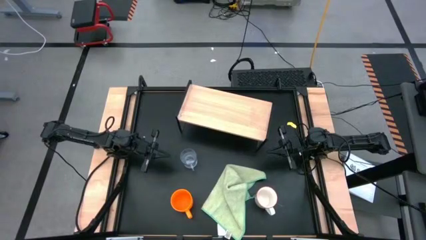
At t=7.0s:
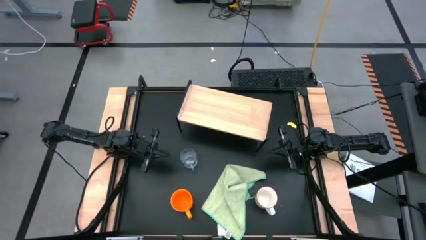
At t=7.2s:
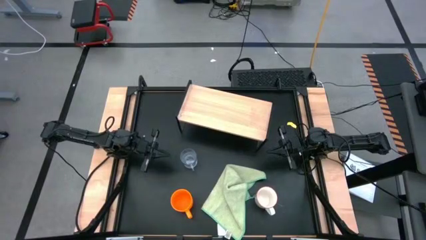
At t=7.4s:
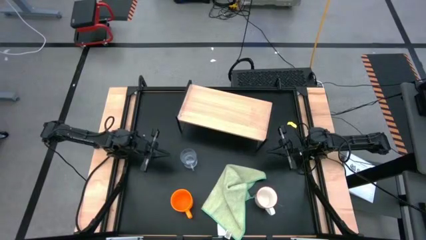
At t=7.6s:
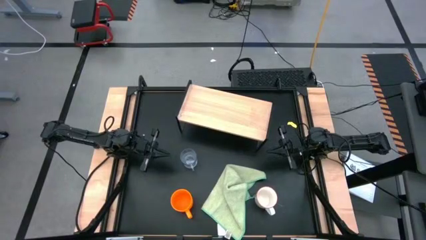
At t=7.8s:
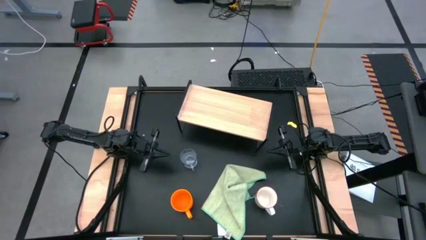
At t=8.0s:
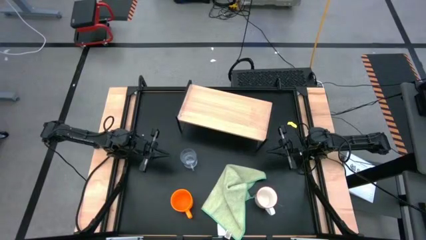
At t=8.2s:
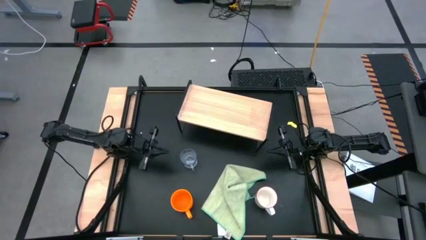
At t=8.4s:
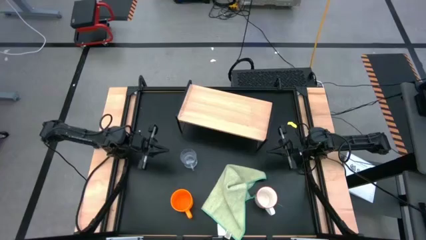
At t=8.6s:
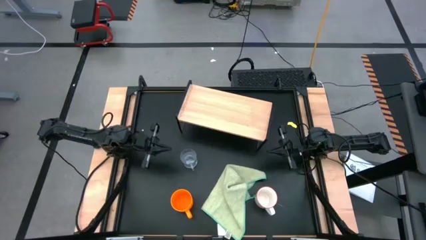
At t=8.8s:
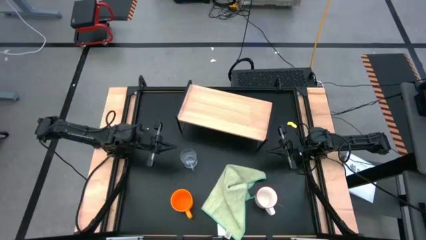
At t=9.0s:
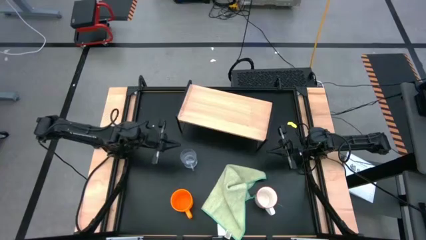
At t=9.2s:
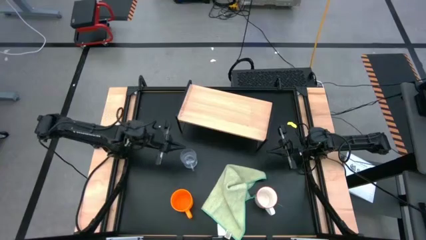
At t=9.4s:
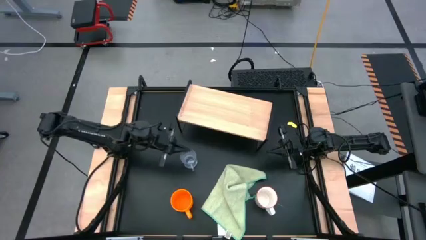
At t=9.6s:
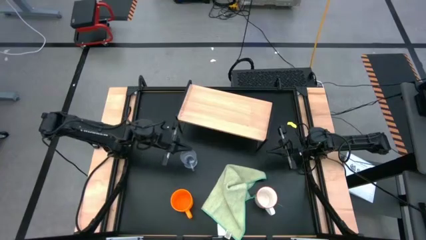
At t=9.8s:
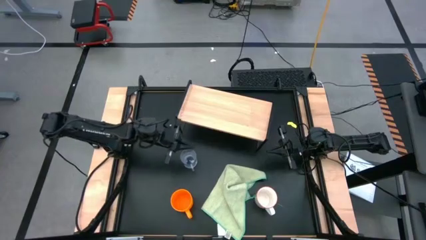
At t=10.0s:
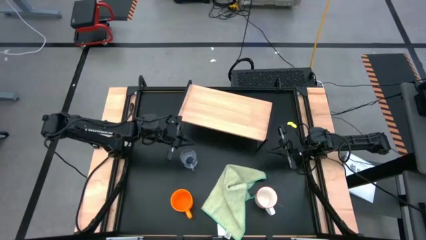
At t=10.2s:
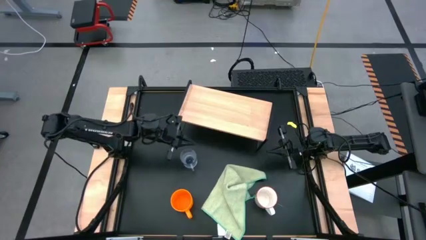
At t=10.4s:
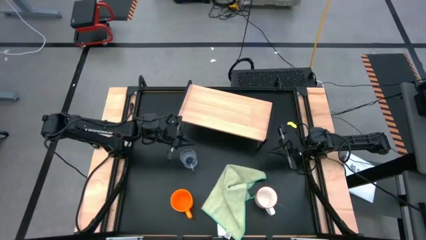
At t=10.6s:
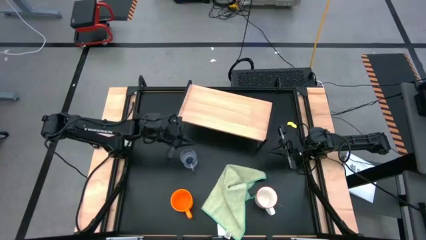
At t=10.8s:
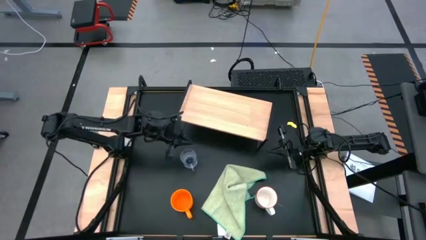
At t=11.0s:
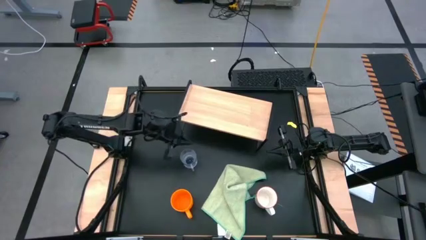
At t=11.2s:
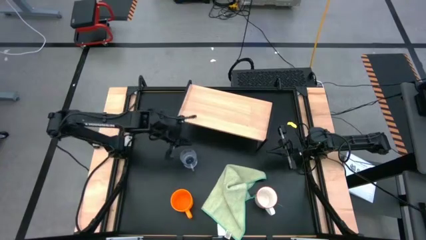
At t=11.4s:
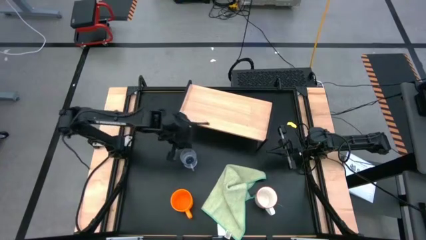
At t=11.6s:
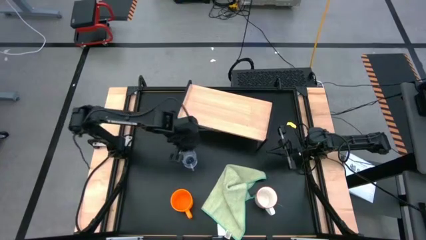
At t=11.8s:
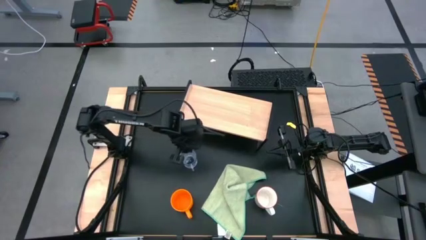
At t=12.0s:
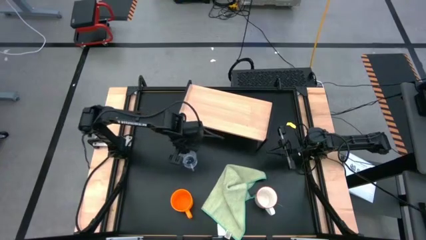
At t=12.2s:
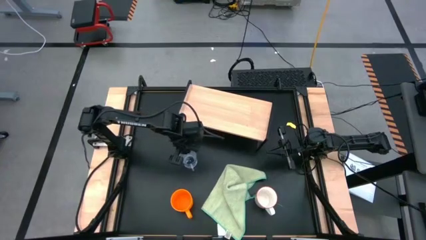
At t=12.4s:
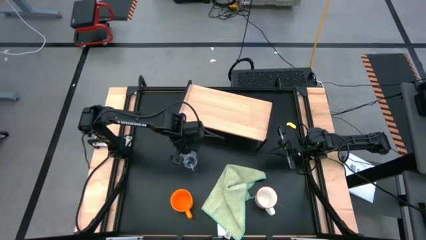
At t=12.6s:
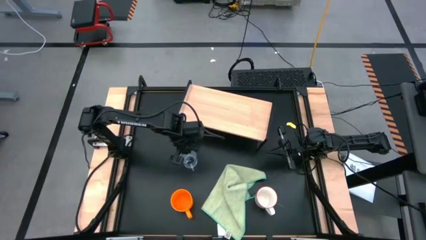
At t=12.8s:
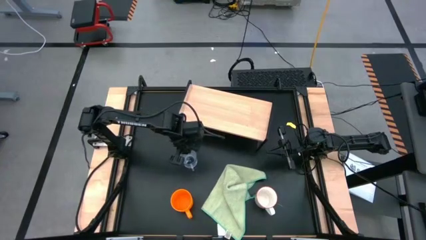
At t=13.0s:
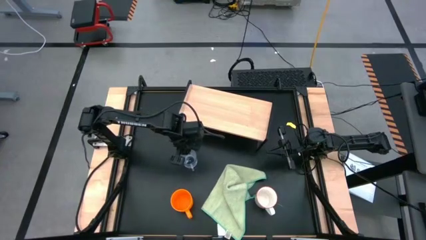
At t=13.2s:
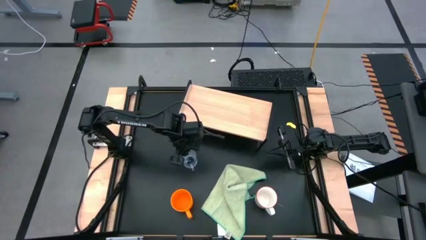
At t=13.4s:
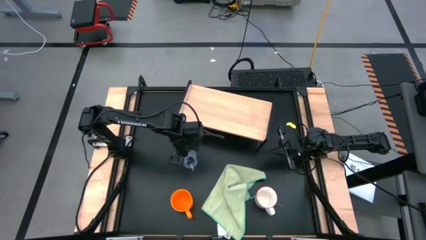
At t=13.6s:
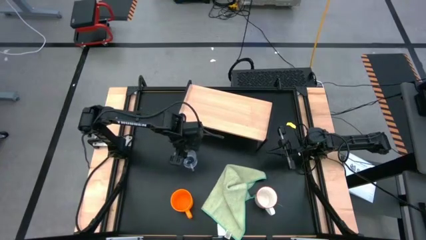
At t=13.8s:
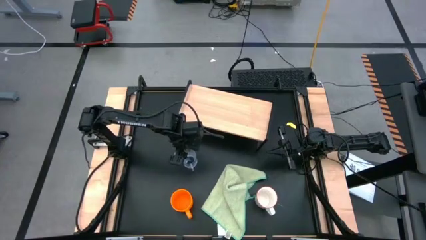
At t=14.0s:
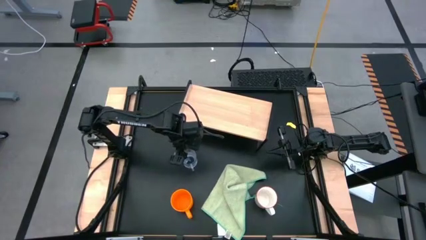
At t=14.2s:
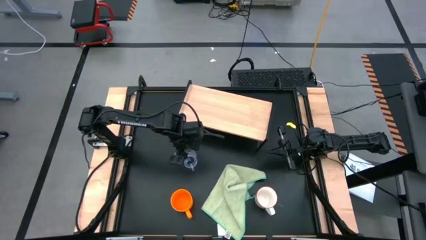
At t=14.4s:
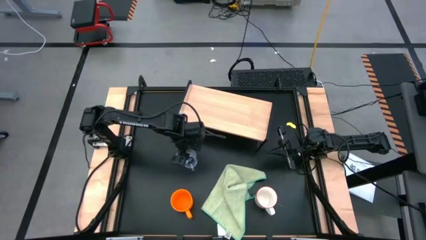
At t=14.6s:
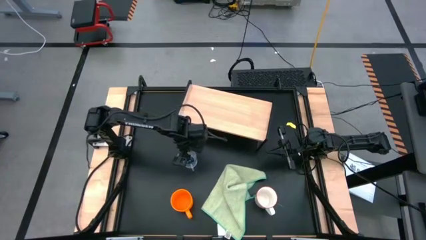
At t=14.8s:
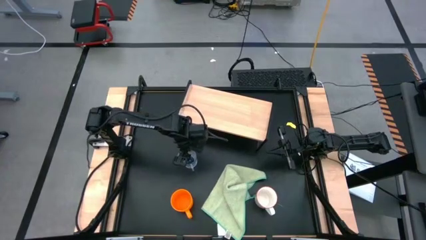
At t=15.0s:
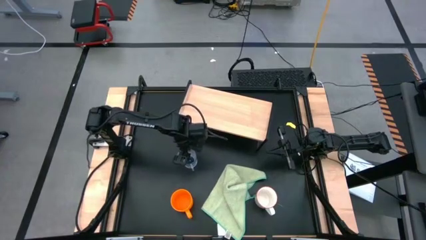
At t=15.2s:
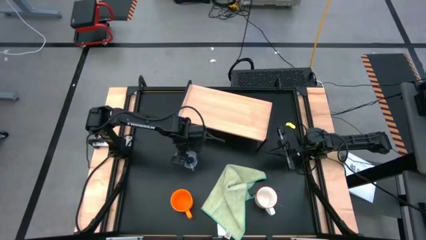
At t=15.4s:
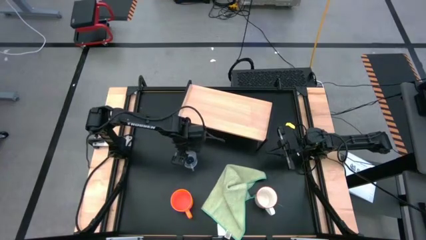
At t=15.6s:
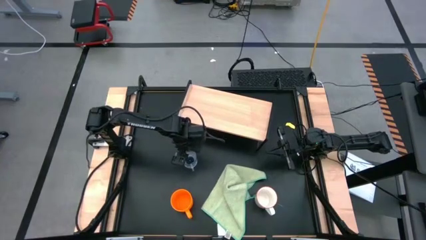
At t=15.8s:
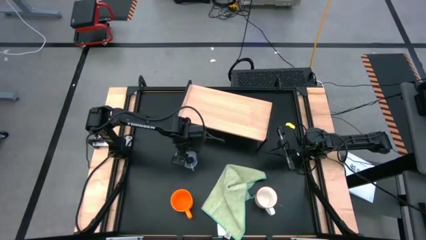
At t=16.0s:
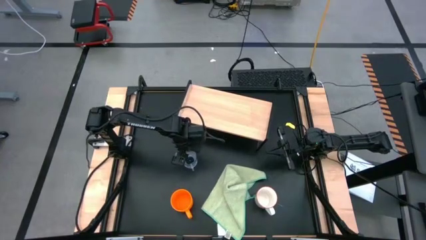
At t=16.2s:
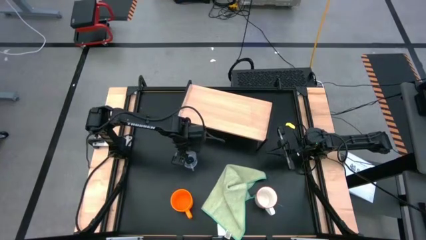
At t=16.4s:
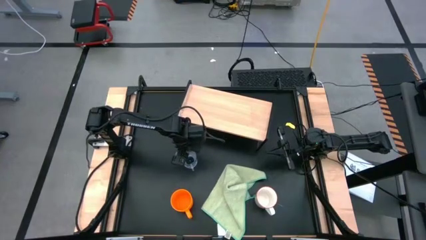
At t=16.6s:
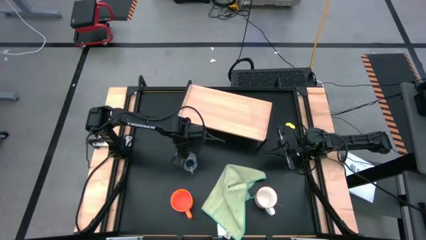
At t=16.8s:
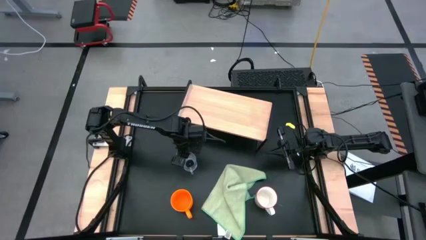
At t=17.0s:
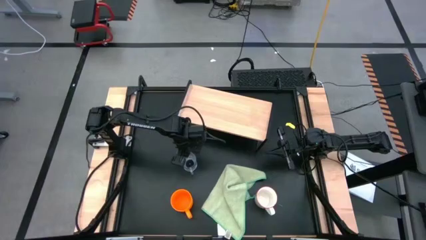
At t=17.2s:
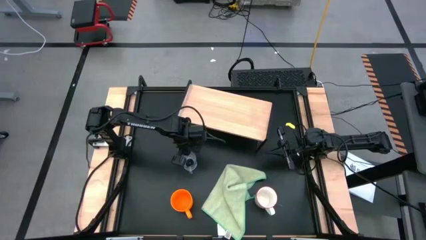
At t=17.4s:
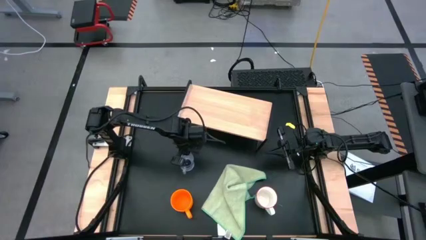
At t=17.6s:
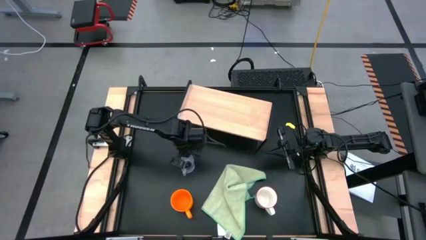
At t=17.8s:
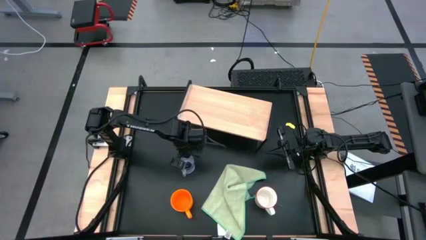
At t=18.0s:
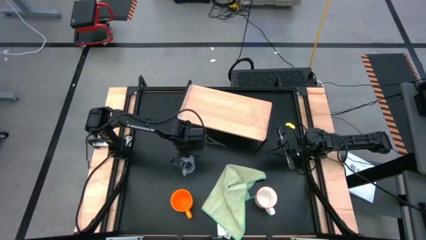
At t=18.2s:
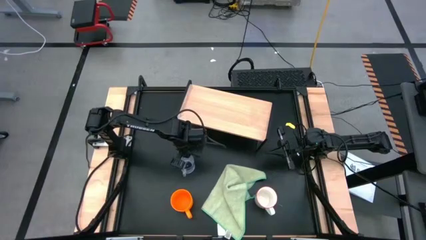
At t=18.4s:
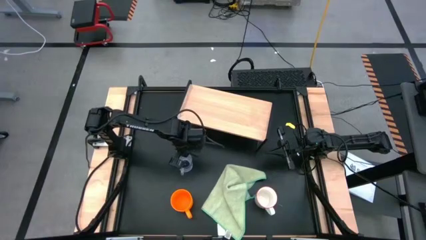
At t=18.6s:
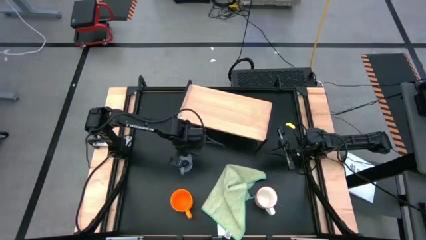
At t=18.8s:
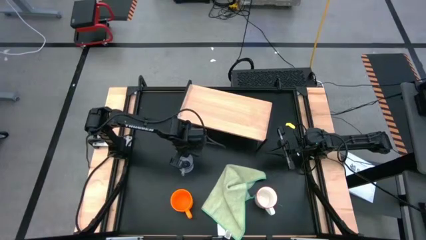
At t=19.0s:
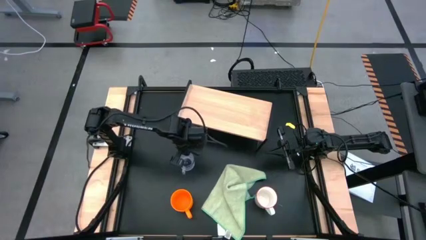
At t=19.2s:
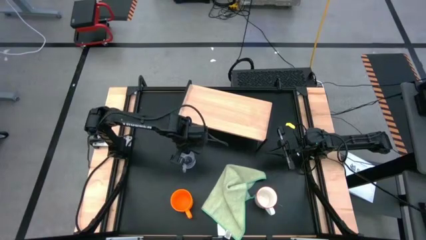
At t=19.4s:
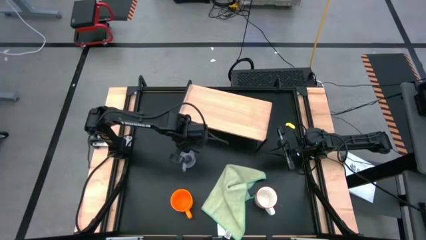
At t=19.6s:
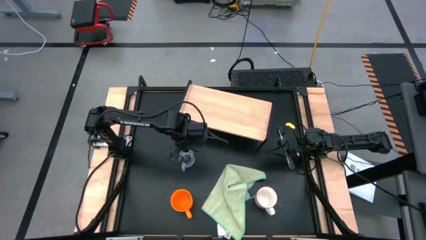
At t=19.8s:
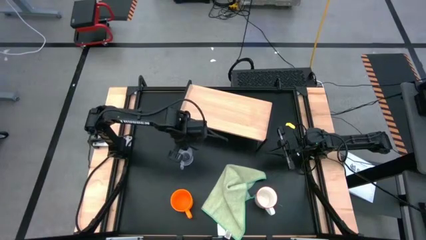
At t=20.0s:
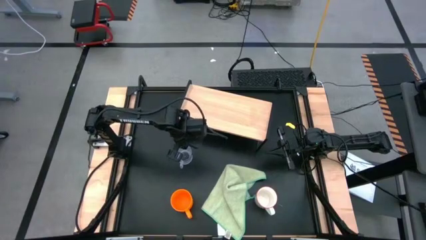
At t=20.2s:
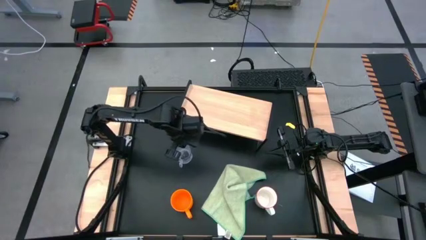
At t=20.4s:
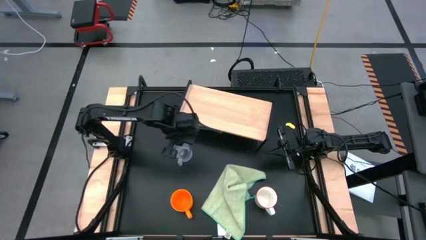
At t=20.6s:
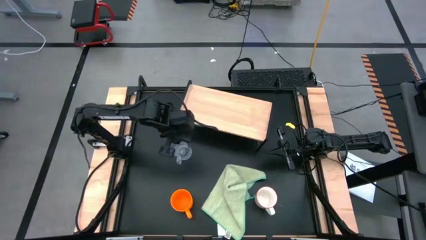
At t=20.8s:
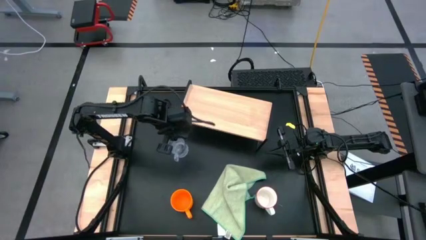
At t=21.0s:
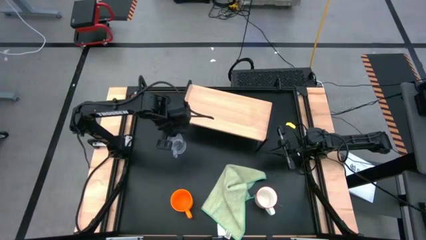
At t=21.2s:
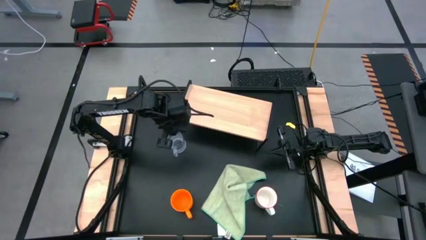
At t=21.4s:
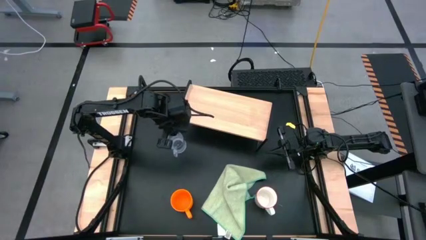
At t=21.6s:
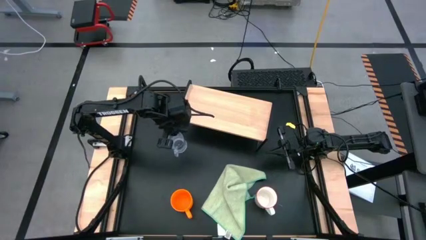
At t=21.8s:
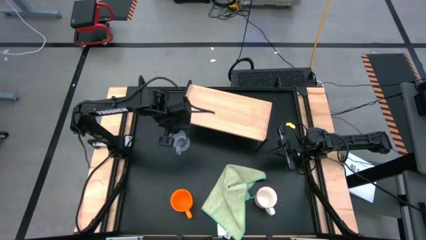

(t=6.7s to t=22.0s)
Task: Stack small to large cups/mugs on shelf
Put the transparent mug on the shelf
